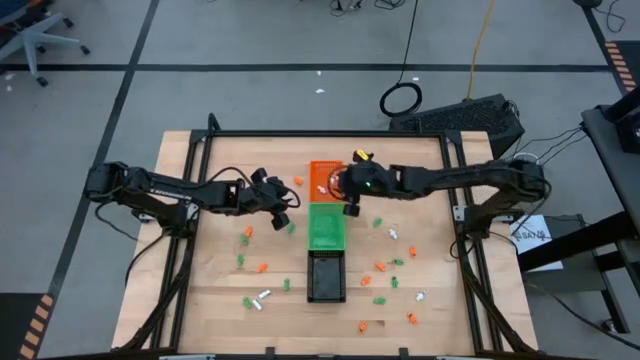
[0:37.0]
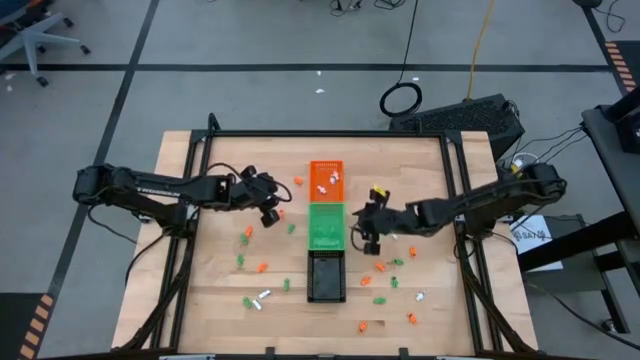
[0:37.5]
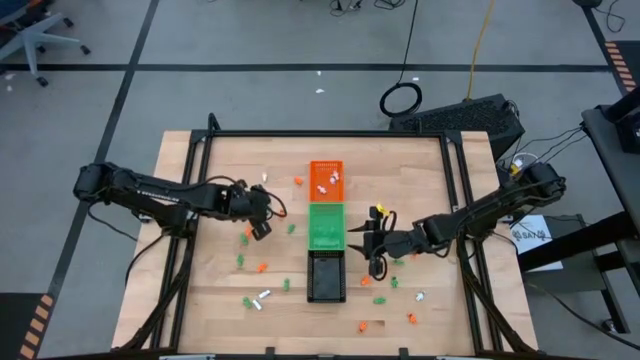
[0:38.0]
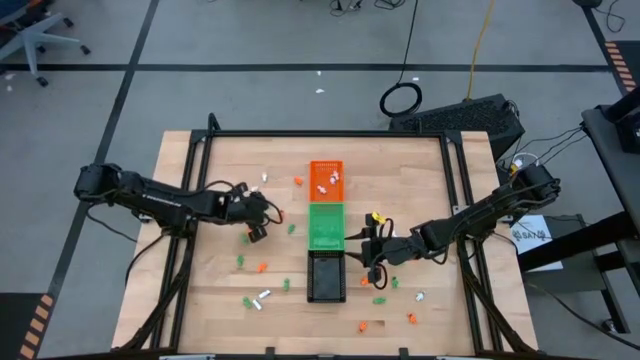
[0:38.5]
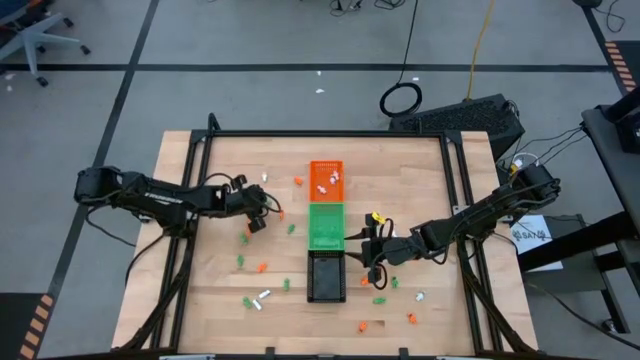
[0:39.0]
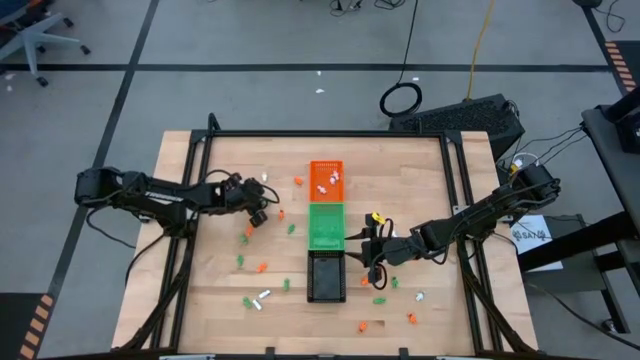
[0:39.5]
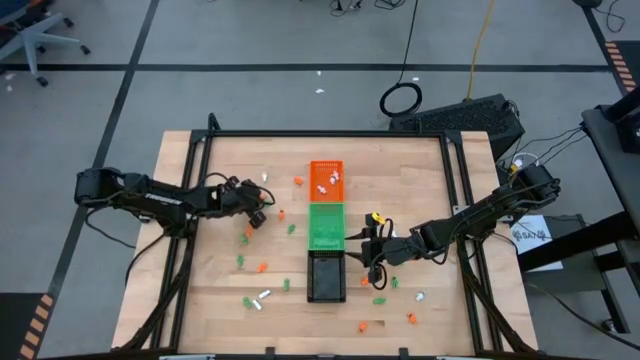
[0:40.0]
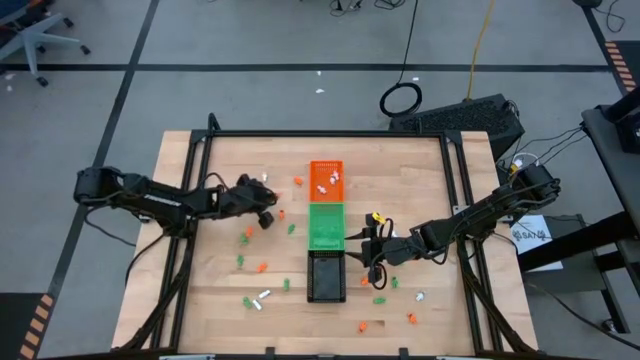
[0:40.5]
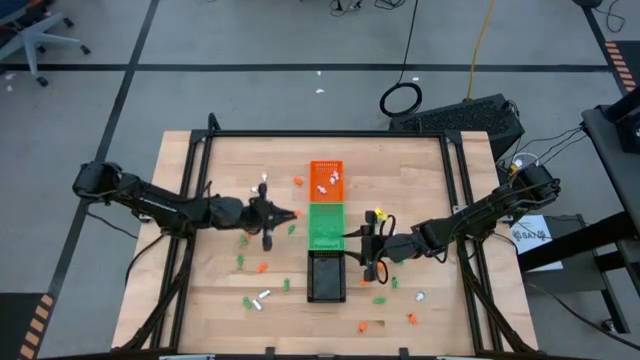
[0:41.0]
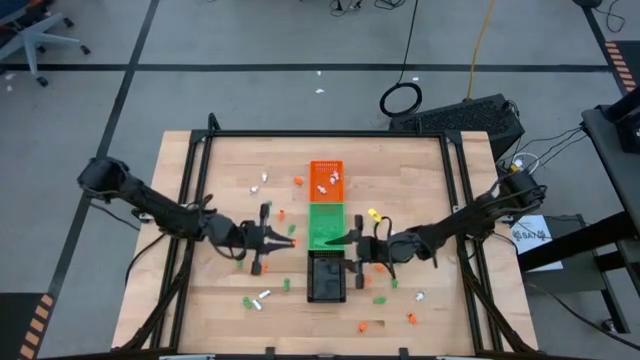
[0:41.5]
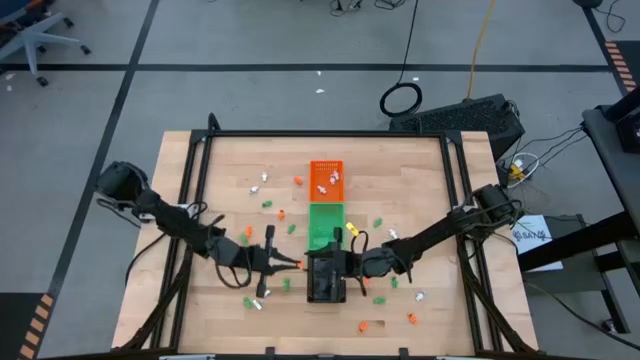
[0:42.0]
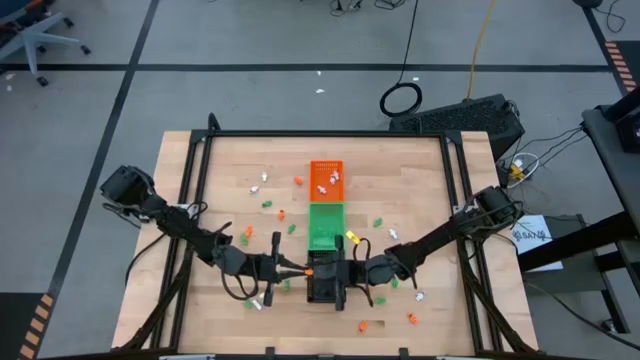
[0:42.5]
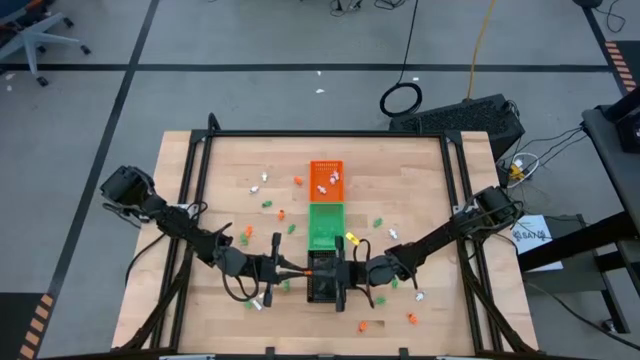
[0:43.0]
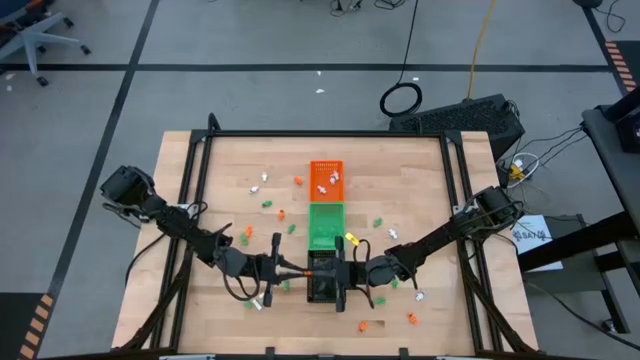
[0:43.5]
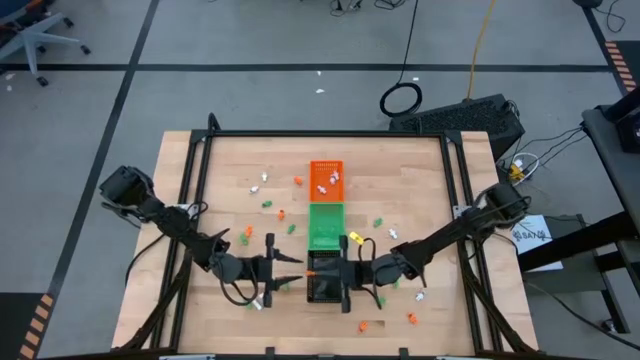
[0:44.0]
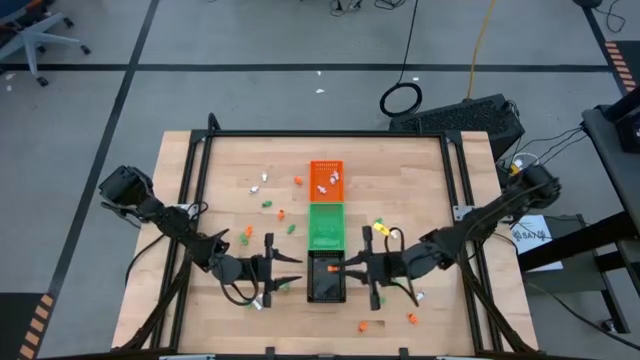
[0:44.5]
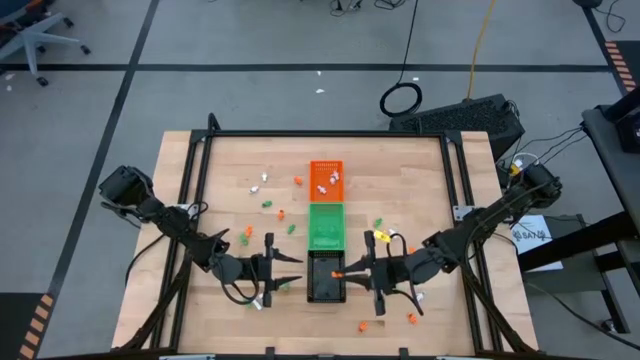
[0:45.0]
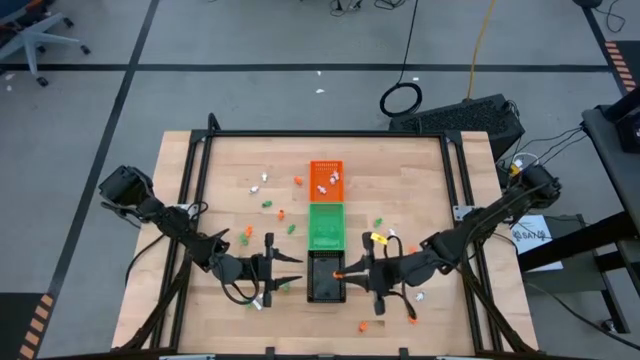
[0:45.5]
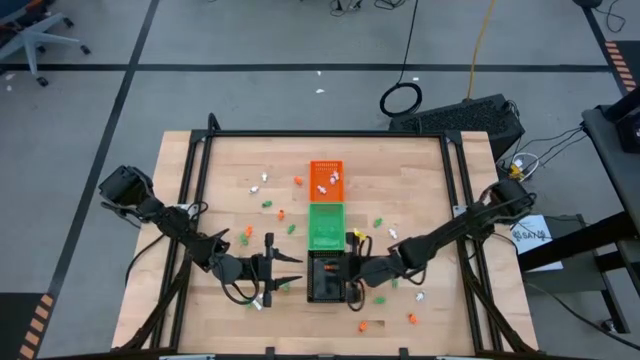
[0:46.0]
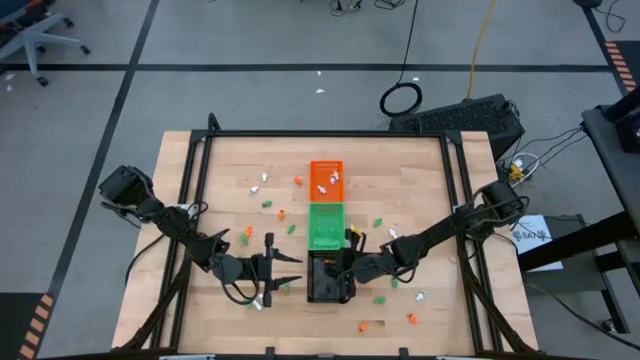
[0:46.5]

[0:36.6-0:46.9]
Task: Sort Halloween decoration
Put the orange skeleton toy into the black bin

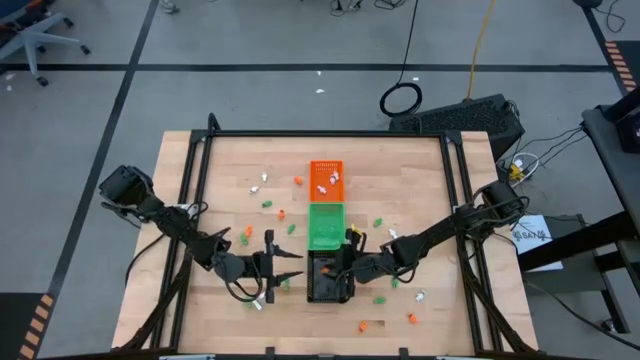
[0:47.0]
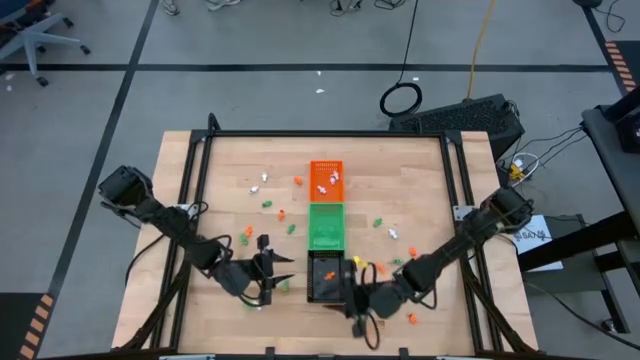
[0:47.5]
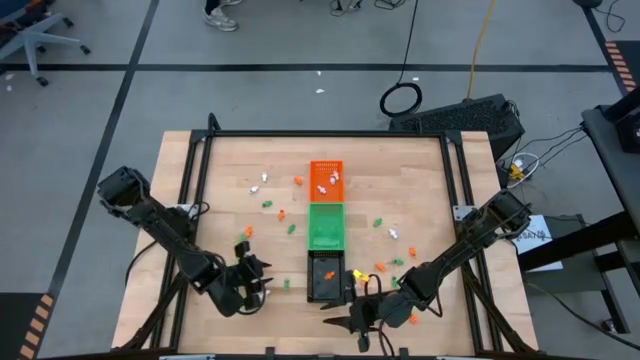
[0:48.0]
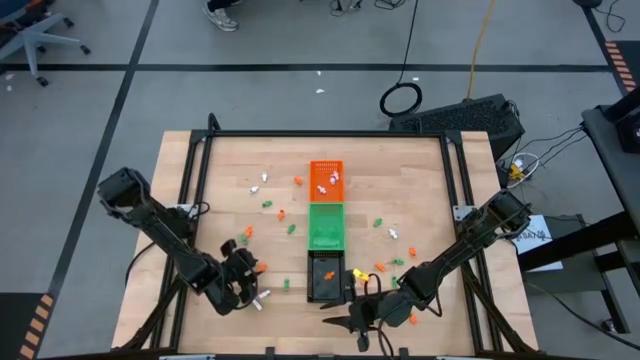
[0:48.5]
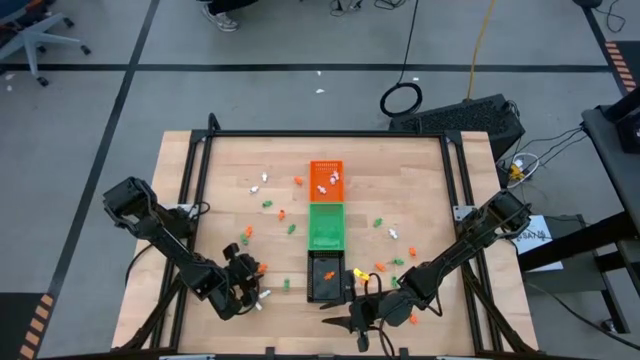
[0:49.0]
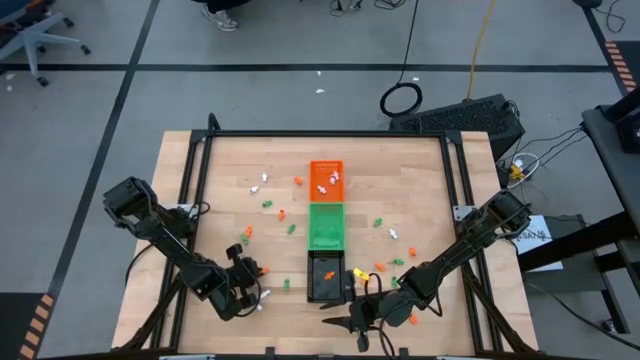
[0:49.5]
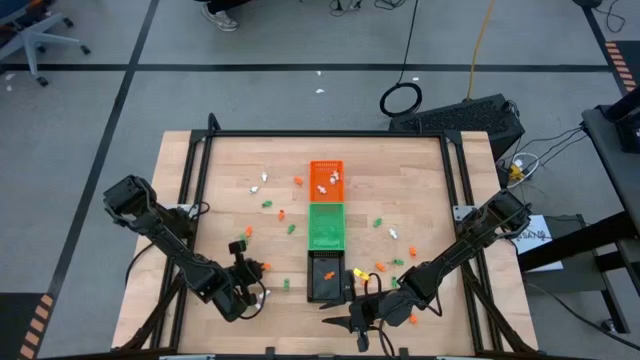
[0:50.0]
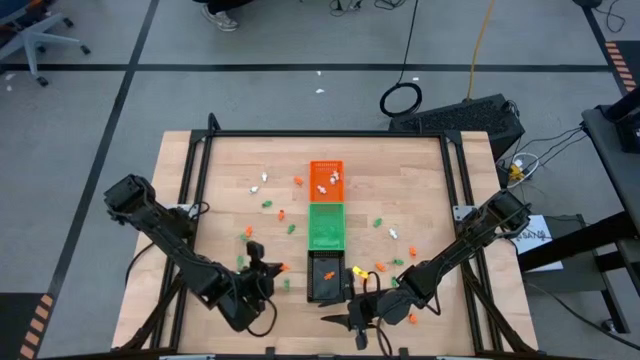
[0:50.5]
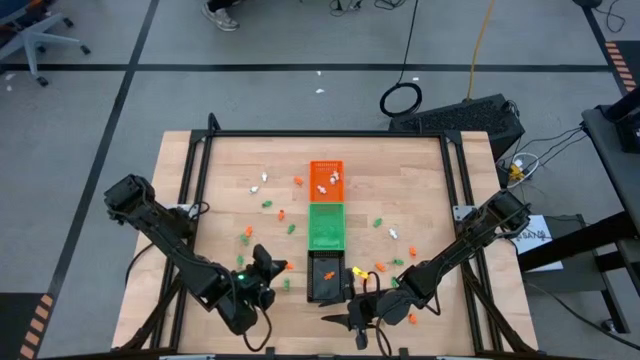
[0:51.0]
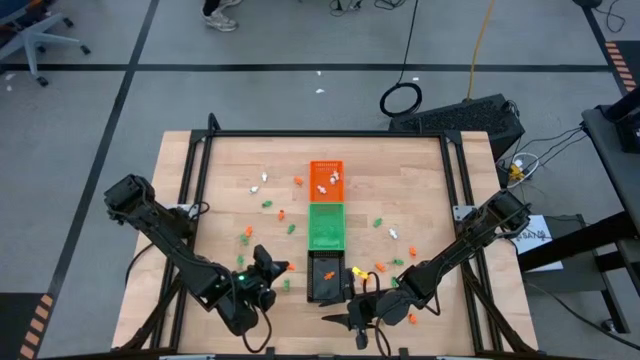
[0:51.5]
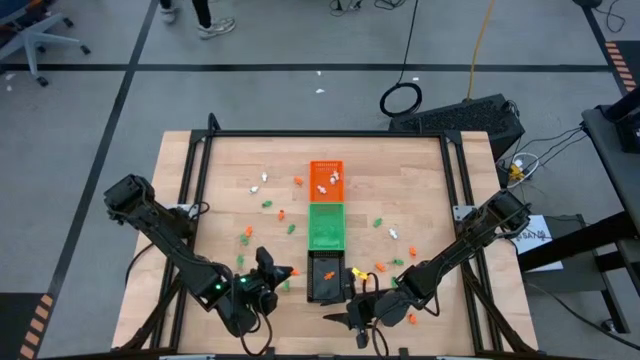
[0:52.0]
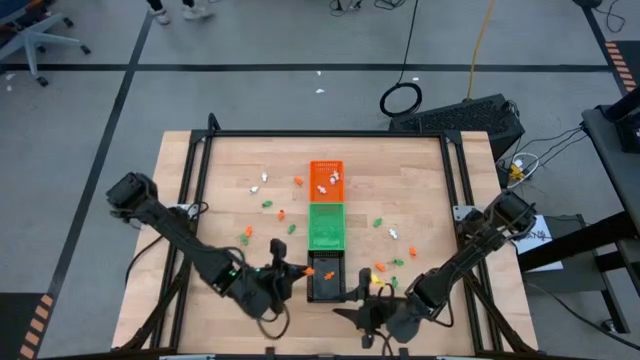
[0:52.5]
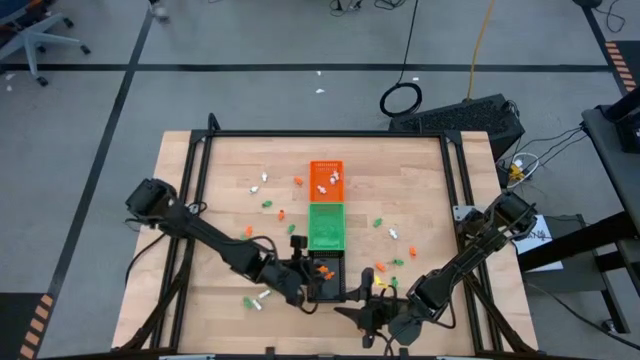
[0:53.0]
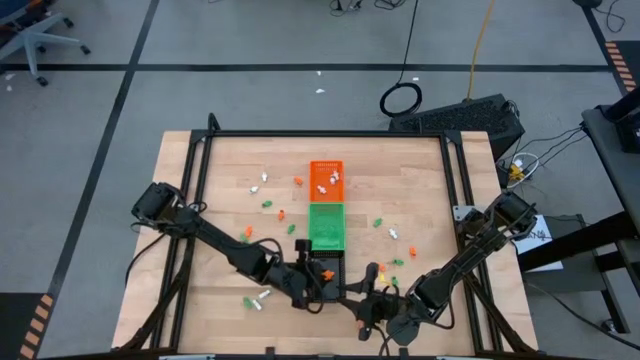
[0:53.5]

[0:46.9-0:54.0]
Put the orange skeleton toy into the black bin

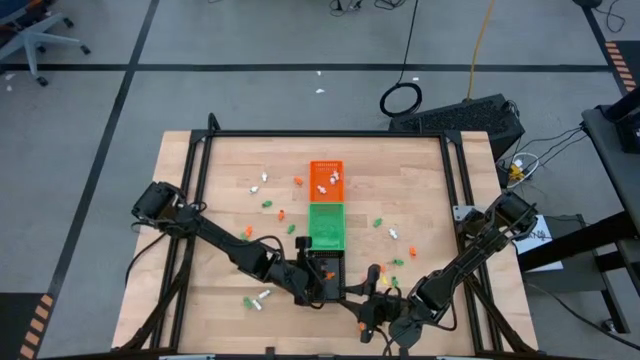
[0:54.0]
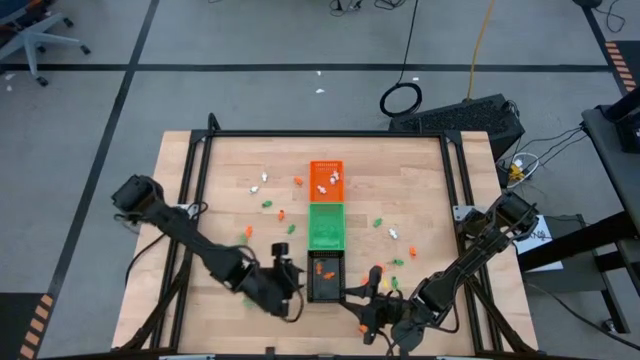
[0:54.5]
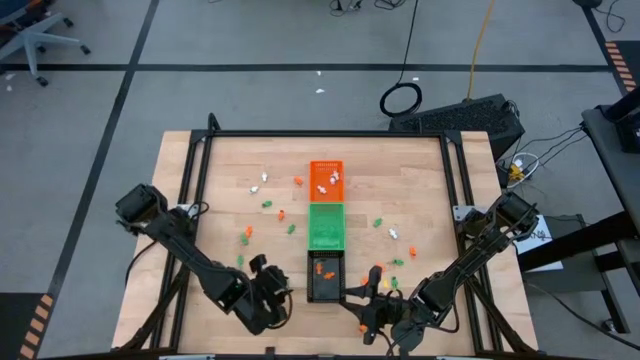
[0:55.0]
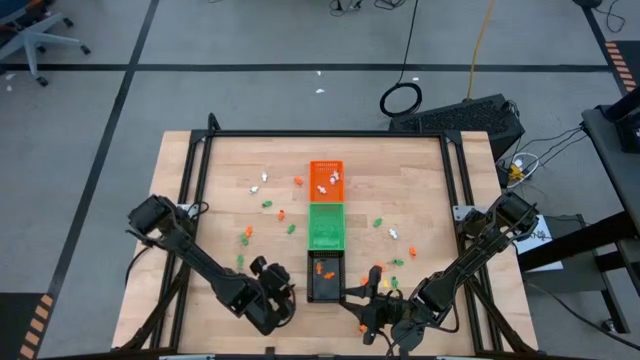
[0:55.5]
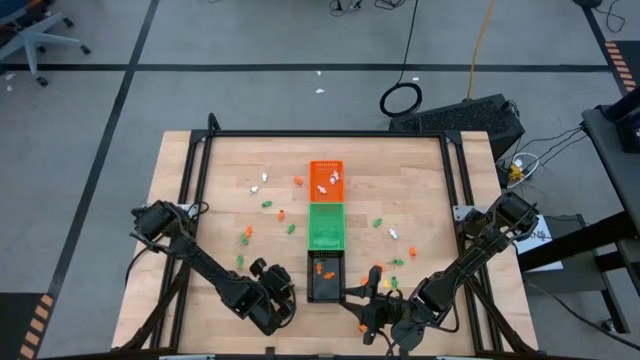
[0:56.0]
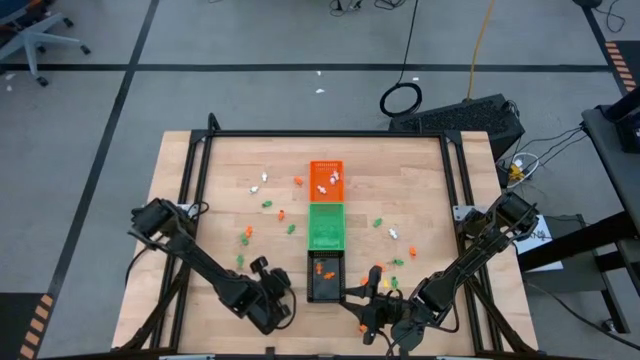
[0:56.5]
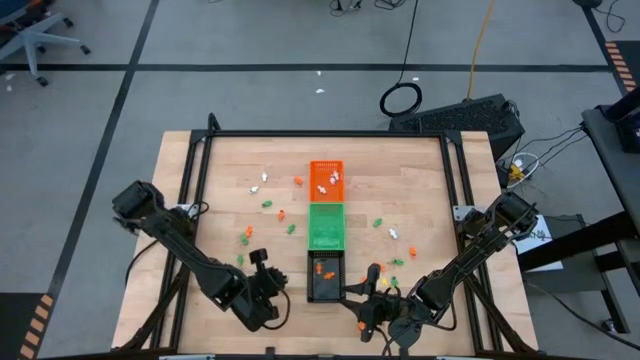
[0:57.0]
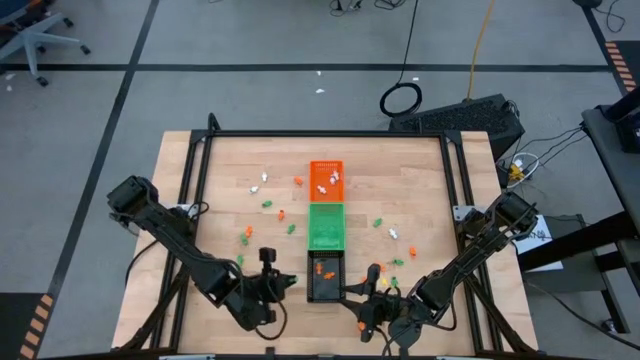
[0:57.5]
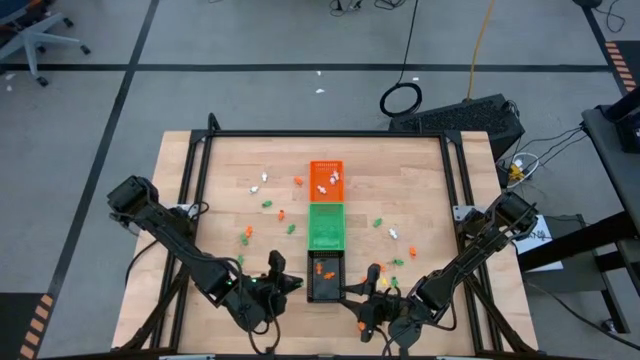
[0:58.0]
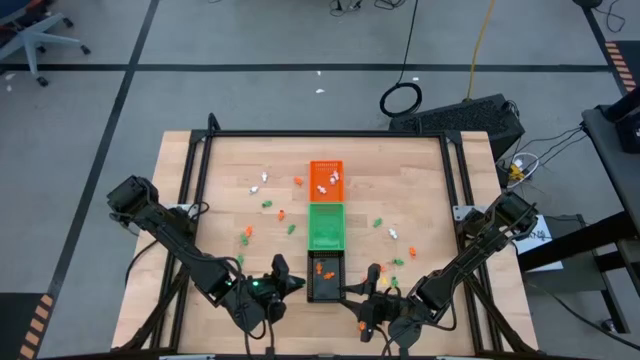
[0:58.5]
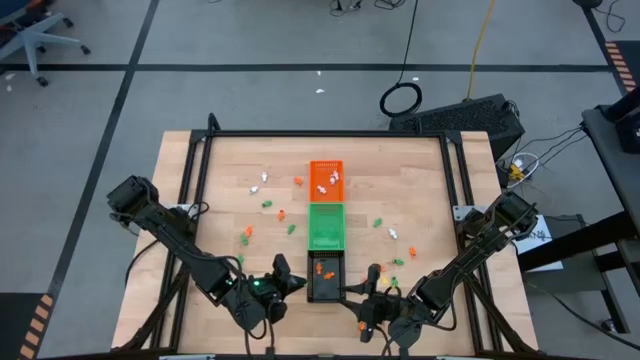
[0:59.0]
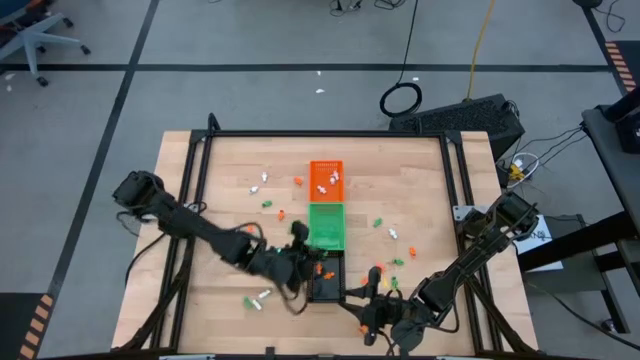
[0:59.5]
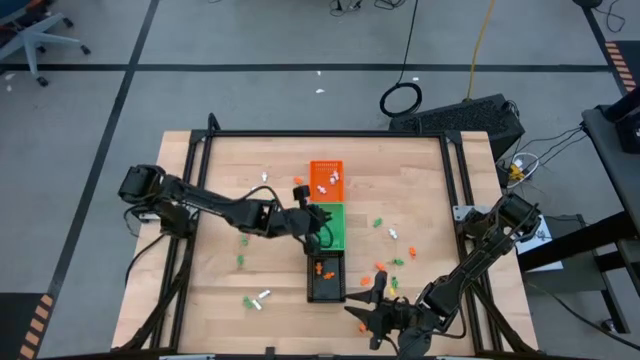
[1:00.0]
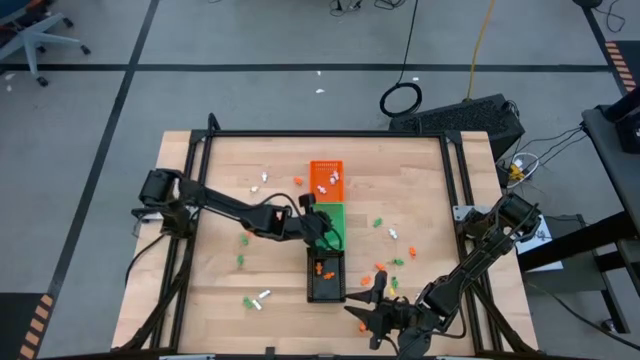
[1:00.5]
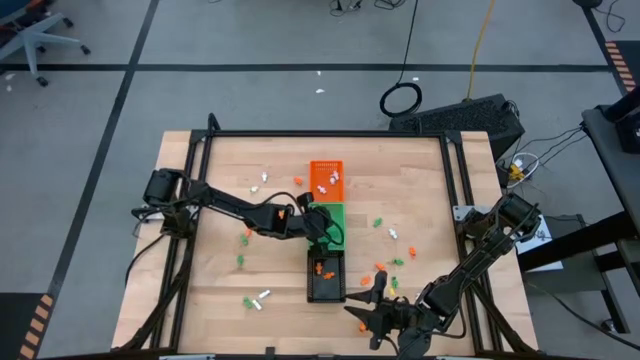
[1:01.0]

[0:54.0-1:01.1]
Put the green skeleton toy into the green bin
